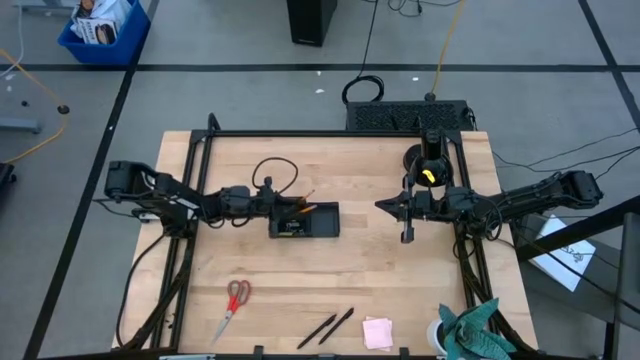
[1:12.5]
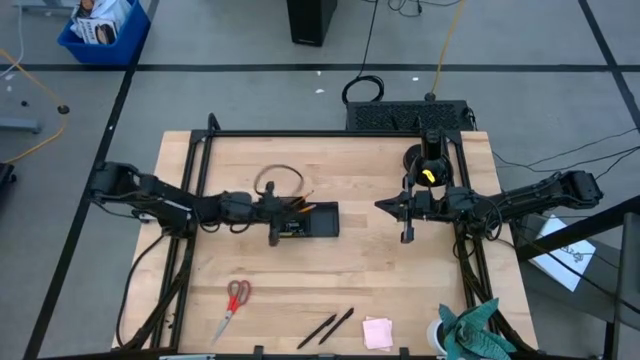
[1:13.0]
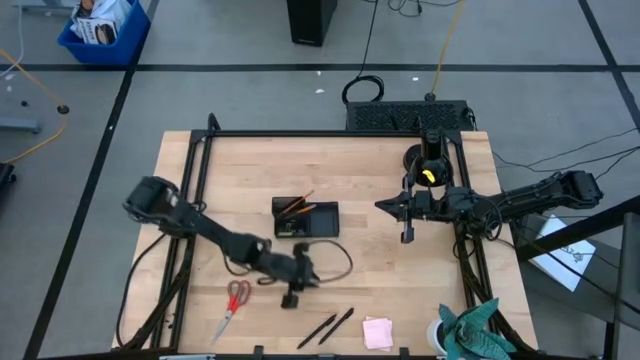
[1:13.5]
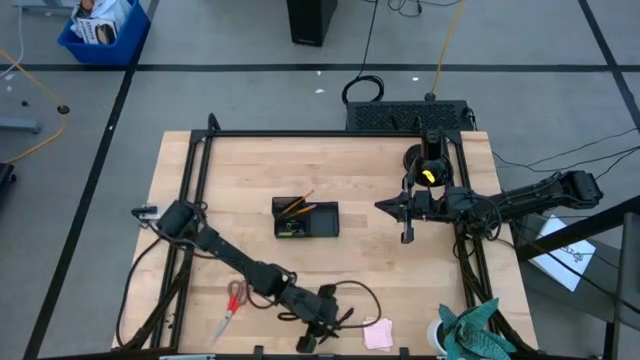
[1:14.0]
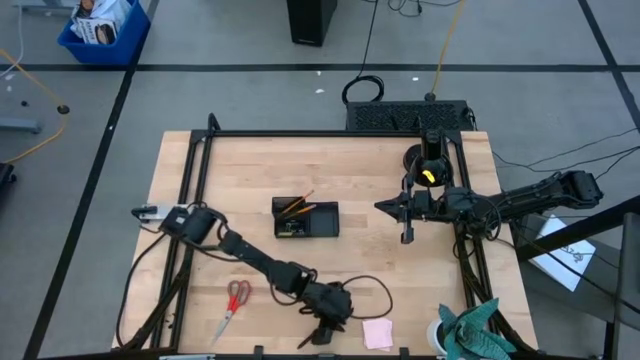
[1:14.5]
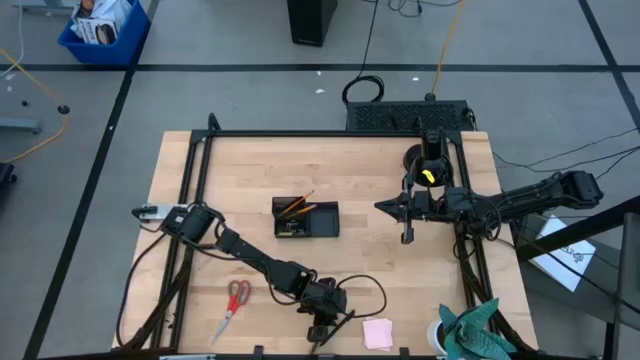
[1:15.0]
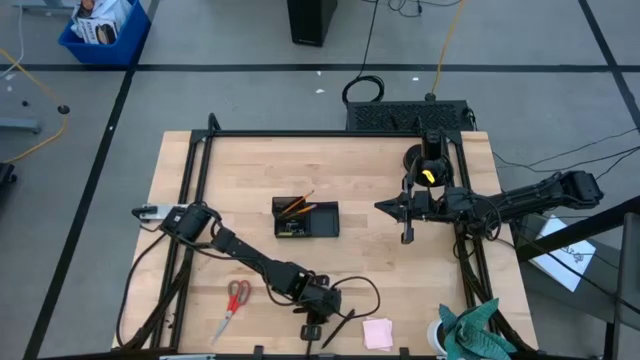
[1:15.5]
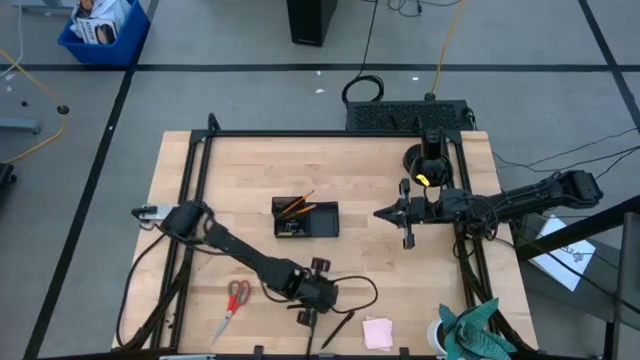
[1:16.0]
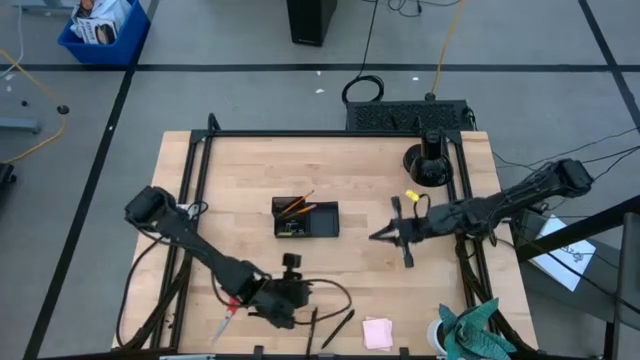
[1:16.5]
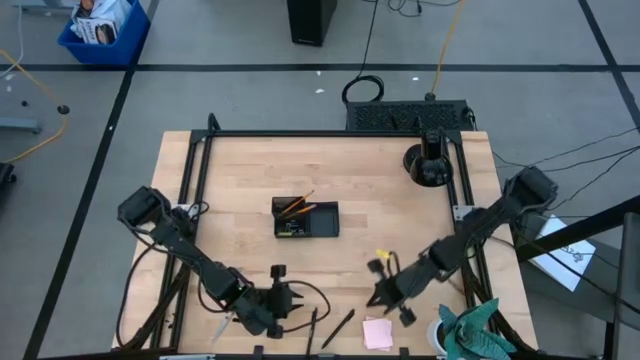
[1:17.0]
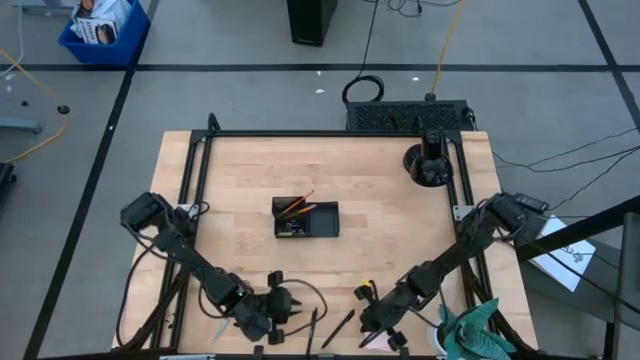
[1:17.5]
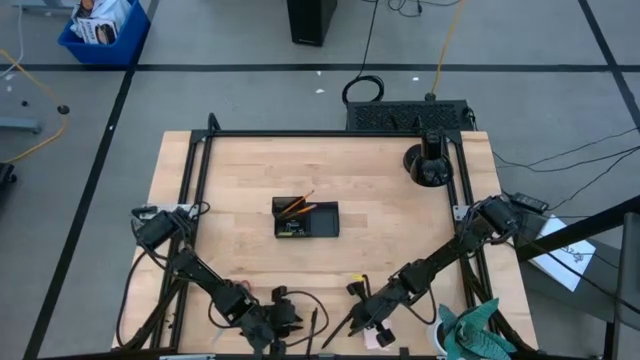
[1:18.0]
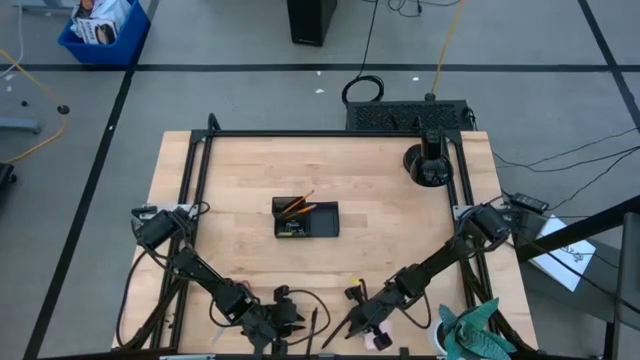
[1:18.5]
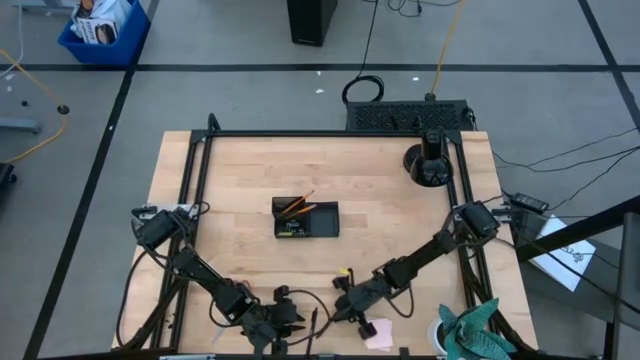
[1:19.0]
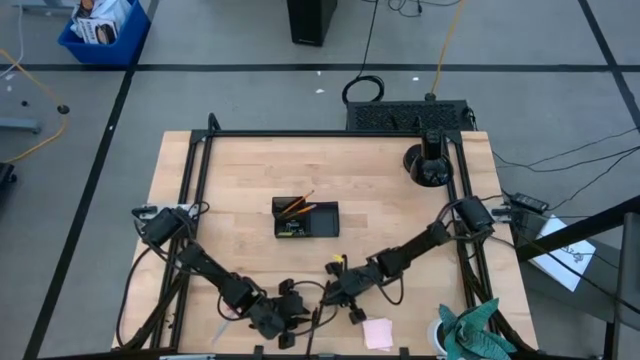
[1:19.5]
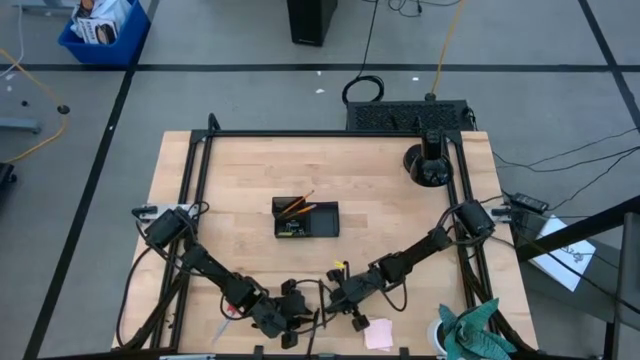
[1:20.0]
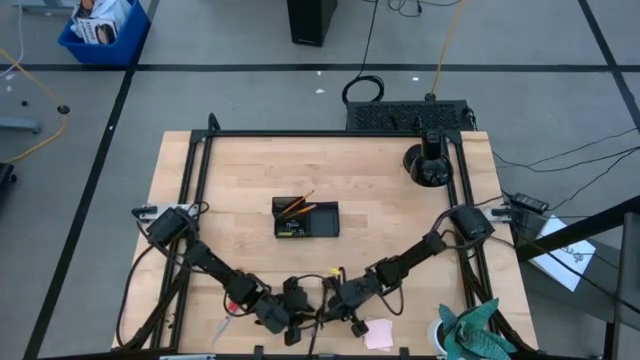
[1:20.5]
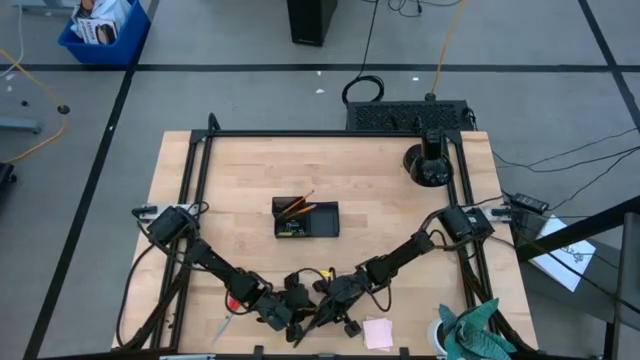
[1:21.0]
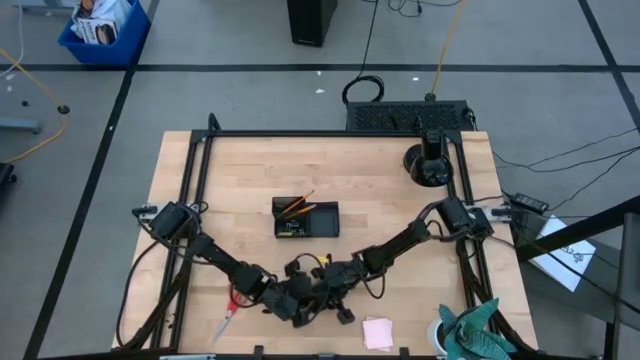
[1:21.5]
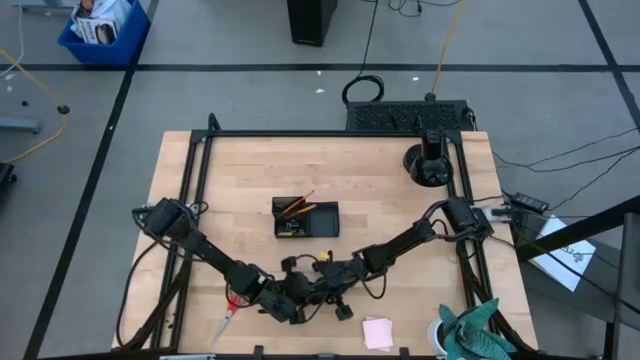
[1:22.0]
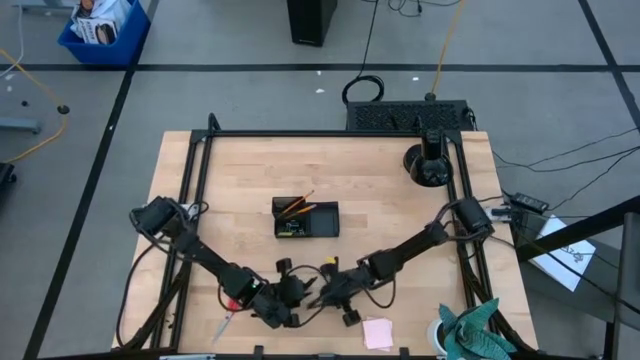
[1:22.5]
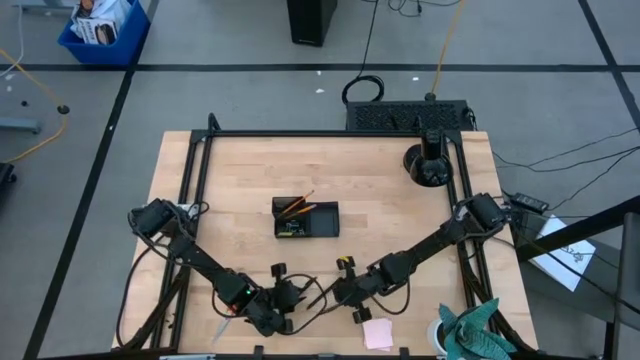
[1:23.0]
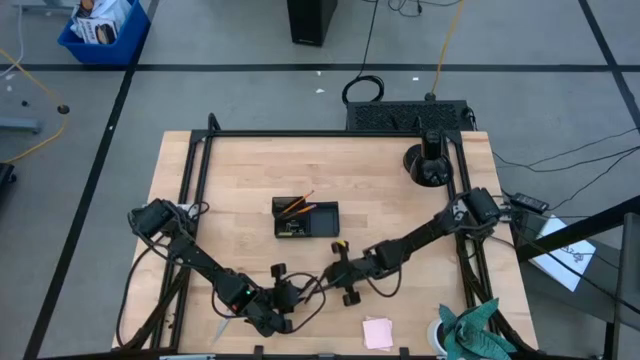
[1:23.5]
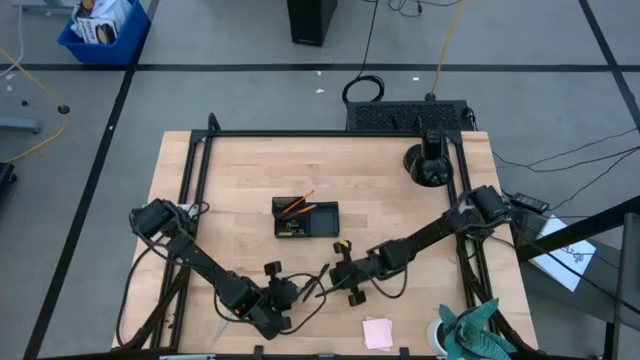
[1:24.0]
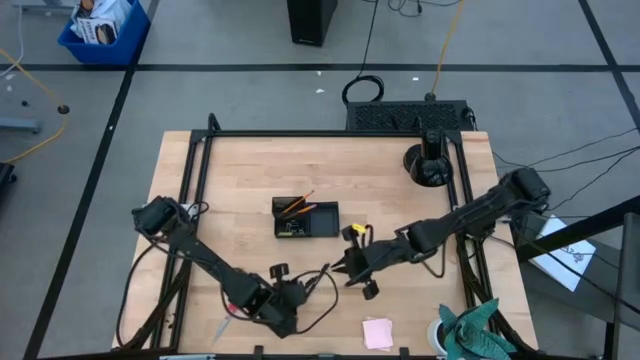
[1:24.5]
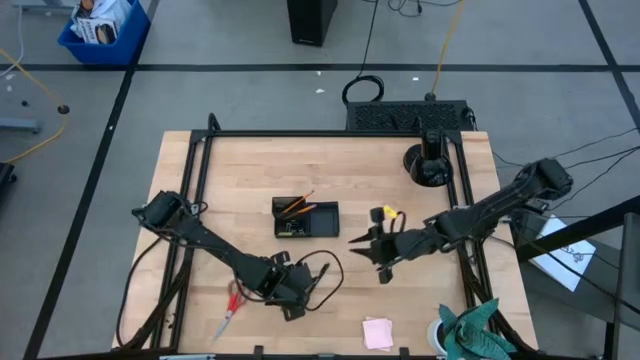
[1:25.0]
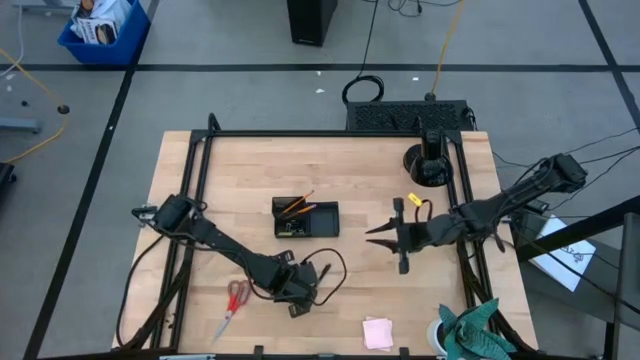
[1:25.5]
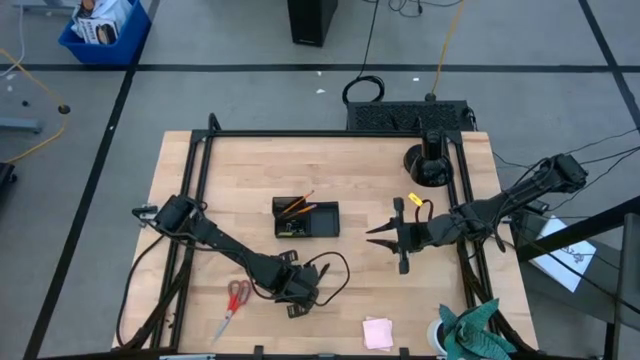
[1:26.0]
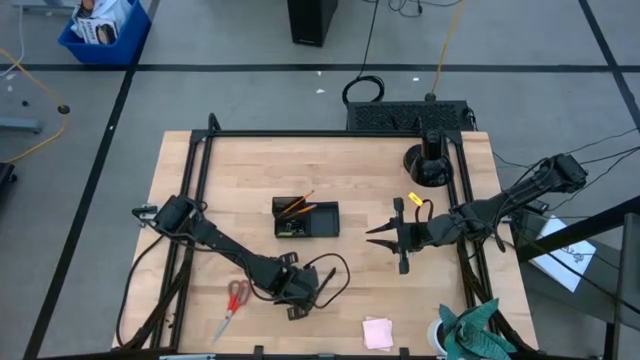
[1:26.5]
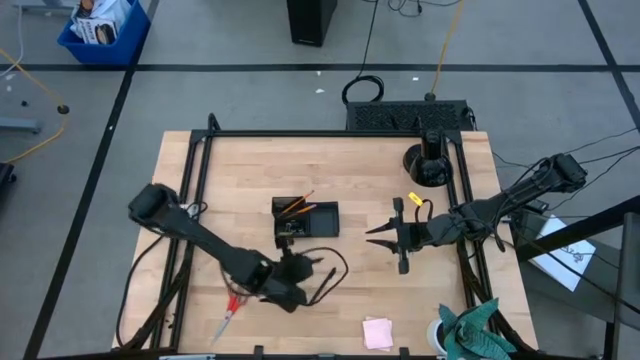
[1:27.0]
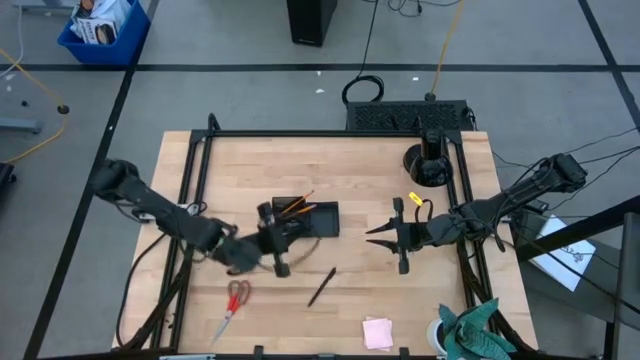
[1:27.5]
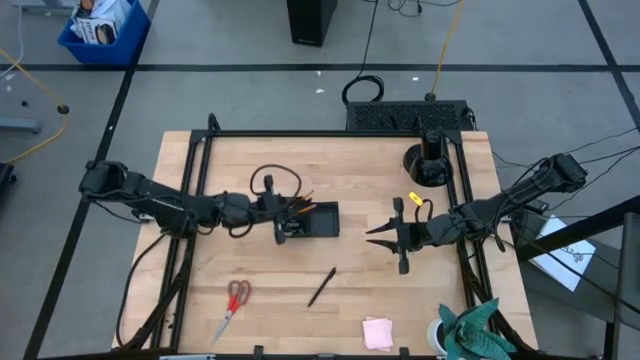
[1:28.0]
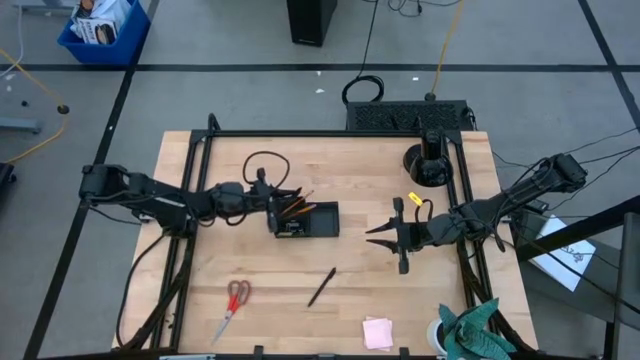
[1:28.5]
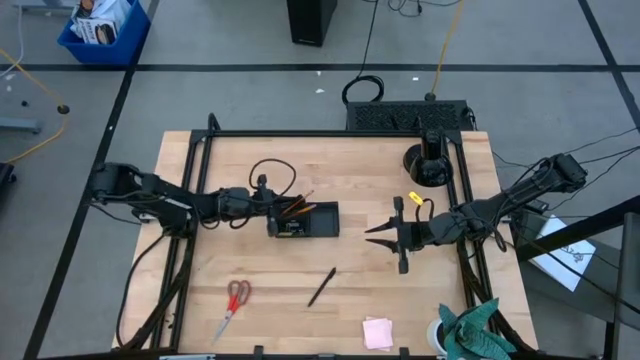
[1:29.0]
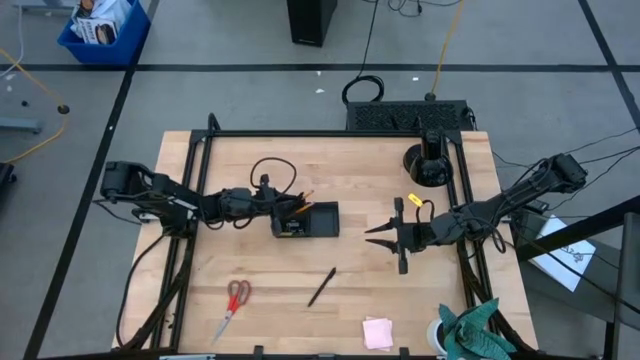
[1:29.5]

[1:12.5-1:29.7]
Task: Pick and place office supplies into organizer
Put the black pen into the black desk organizer

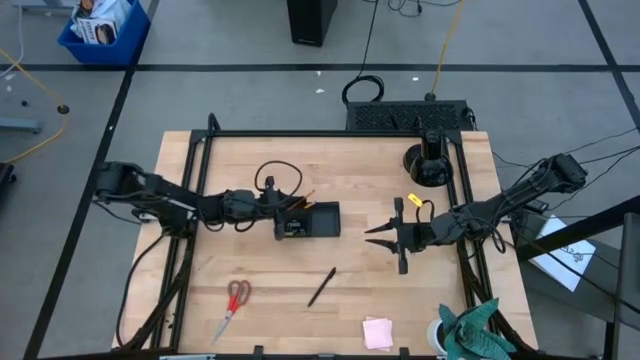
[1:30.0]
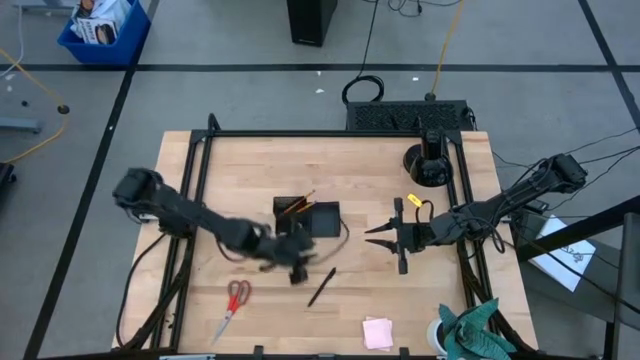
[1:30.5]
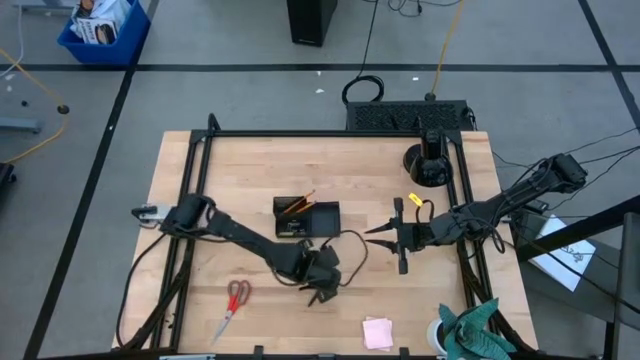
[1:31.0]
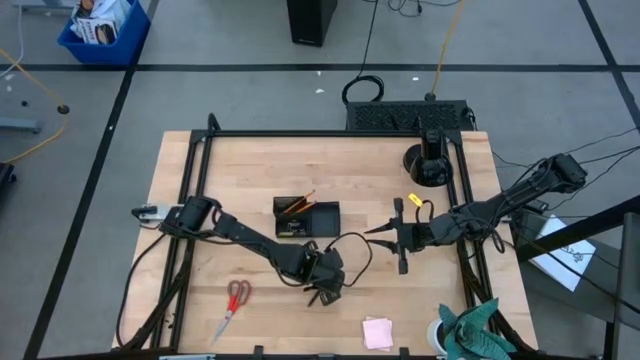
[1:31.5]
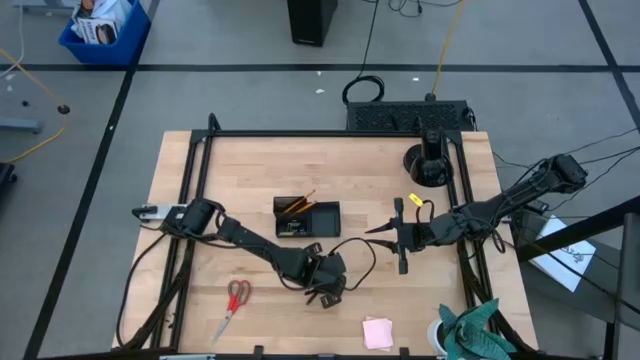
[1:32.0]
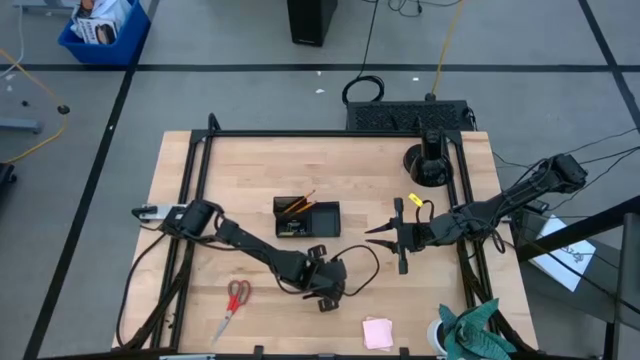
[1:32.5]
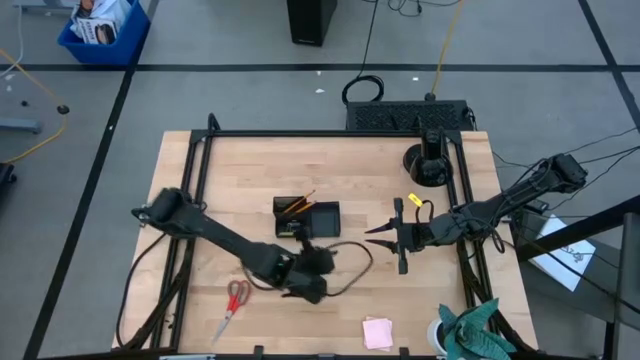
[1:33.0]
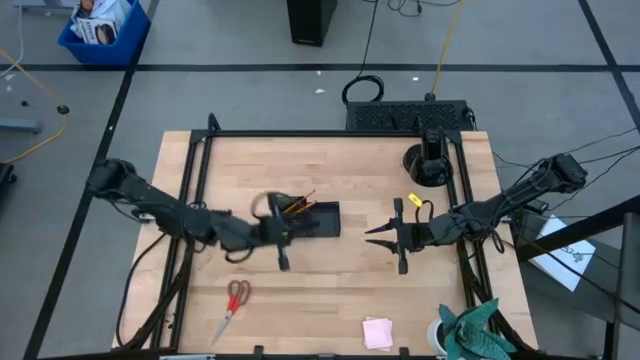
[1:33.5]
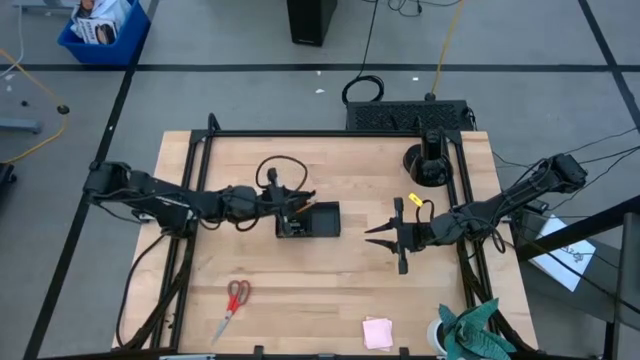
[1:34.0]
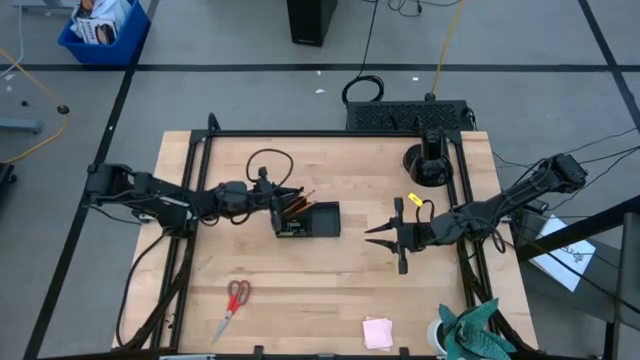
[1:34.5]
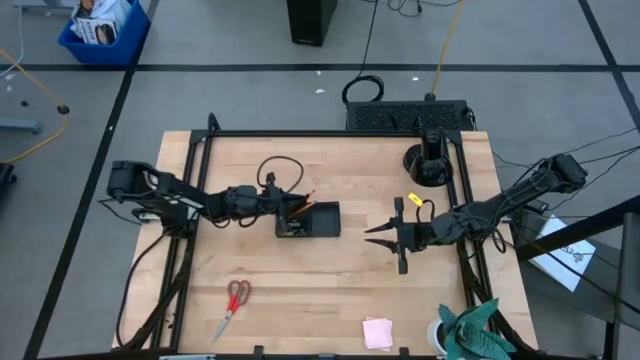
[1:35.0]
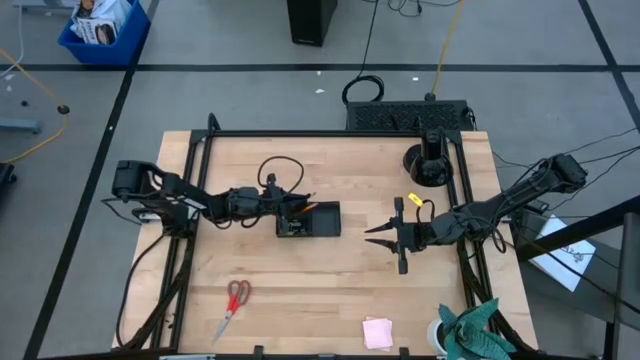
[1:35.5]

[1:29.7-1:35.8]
Put the black pen into the black desk organizer
